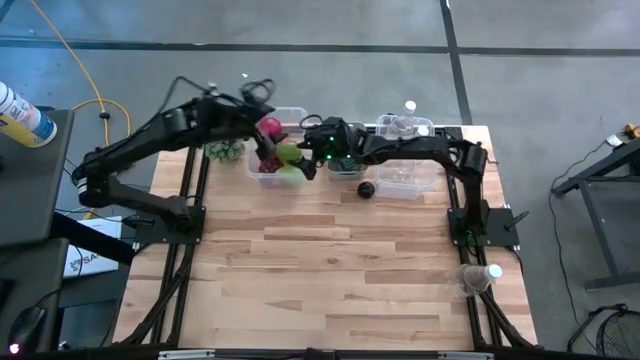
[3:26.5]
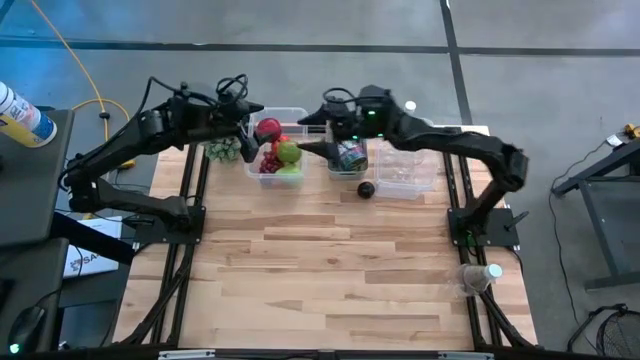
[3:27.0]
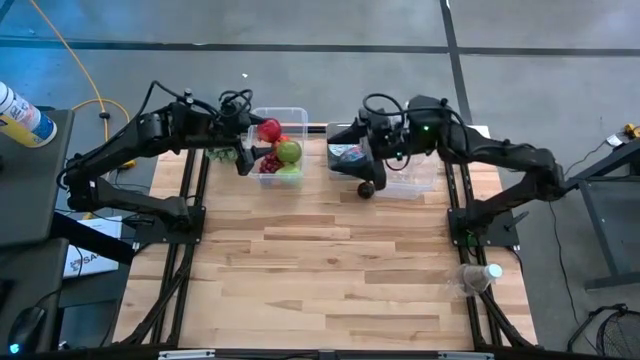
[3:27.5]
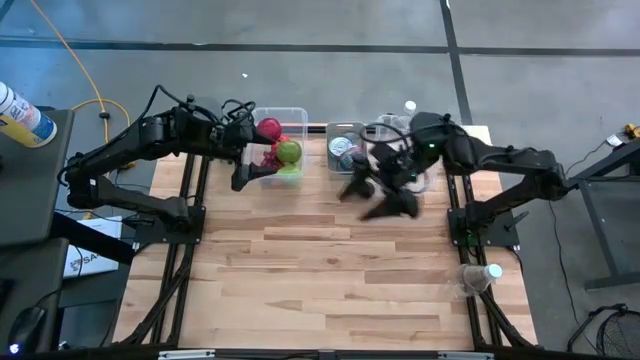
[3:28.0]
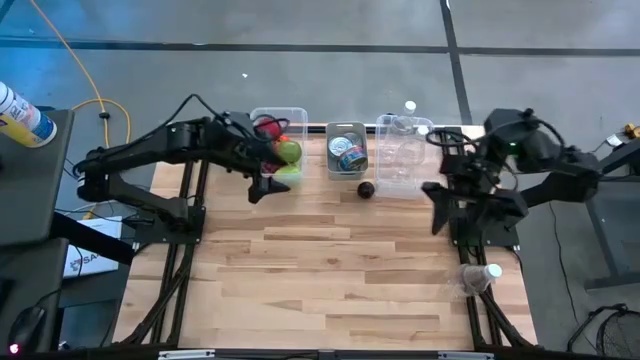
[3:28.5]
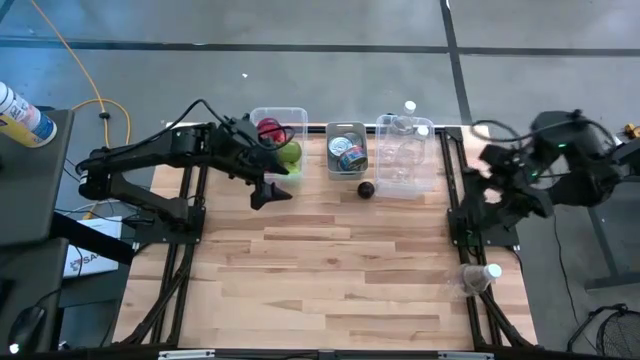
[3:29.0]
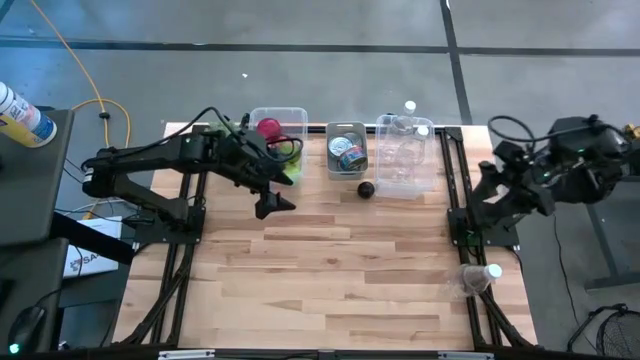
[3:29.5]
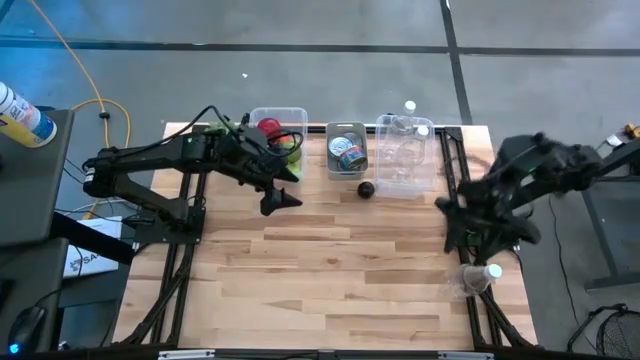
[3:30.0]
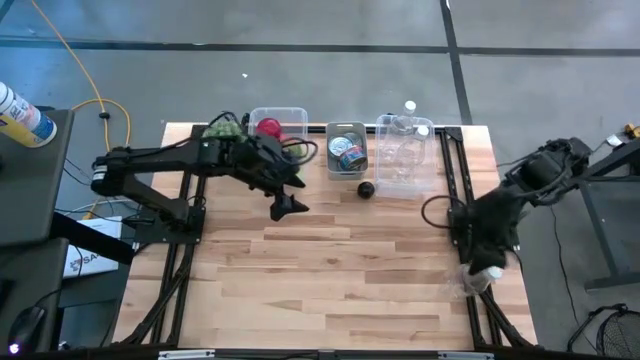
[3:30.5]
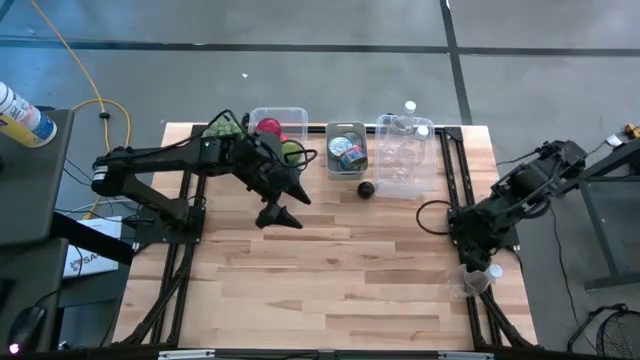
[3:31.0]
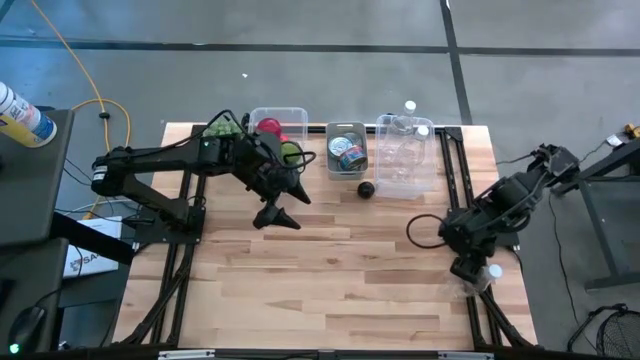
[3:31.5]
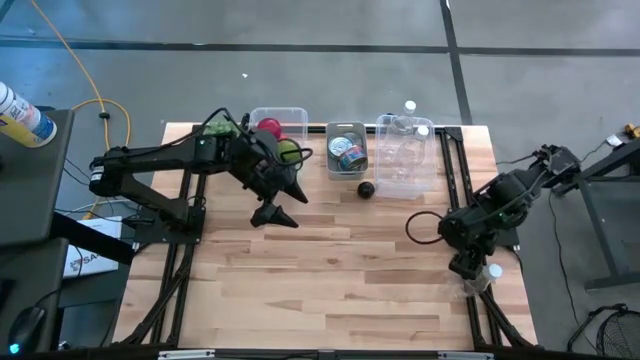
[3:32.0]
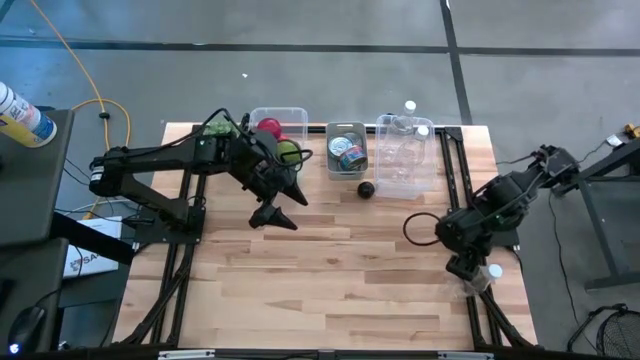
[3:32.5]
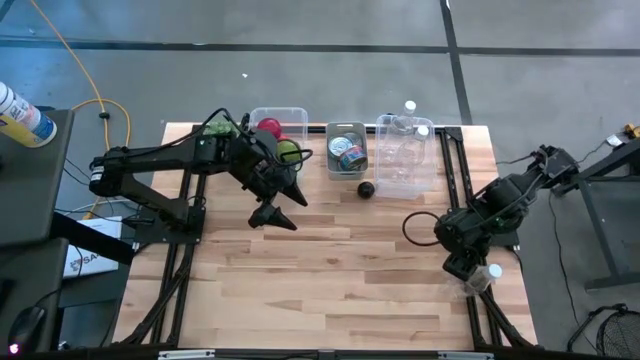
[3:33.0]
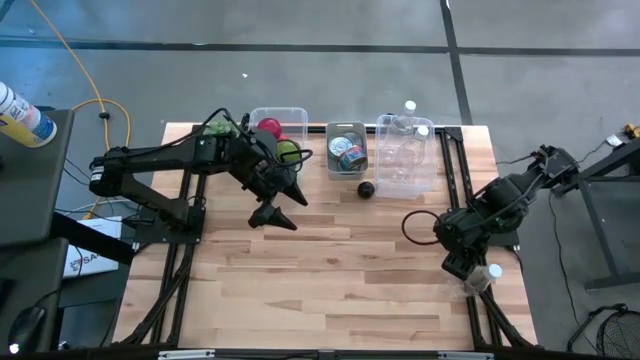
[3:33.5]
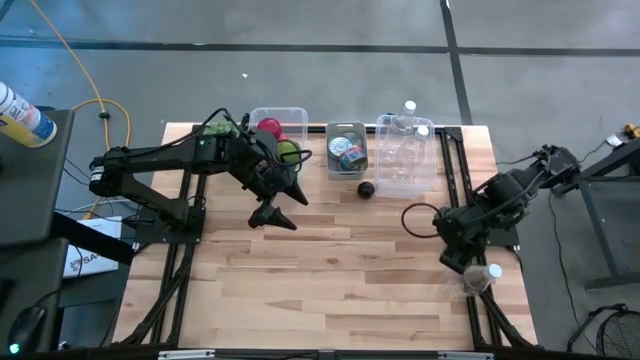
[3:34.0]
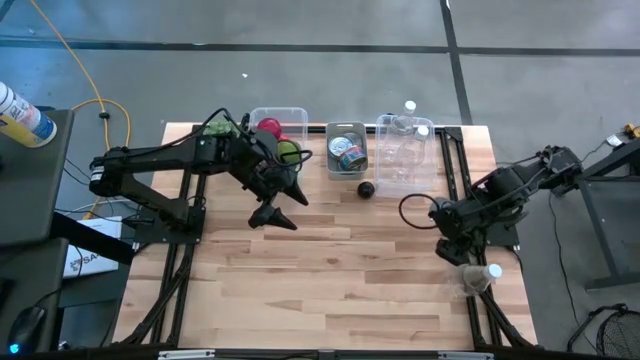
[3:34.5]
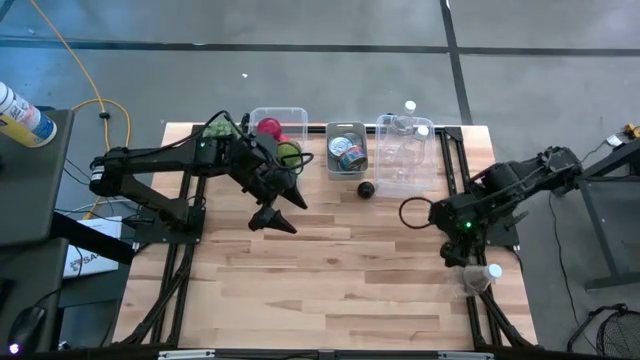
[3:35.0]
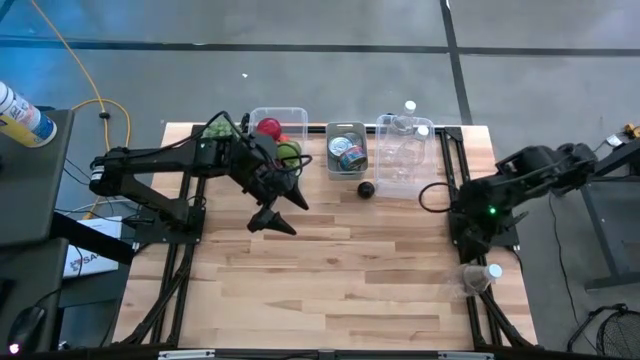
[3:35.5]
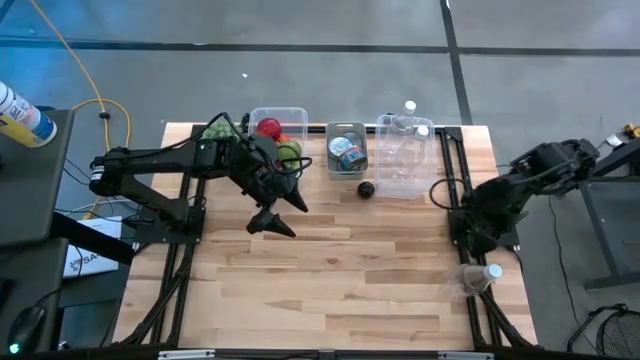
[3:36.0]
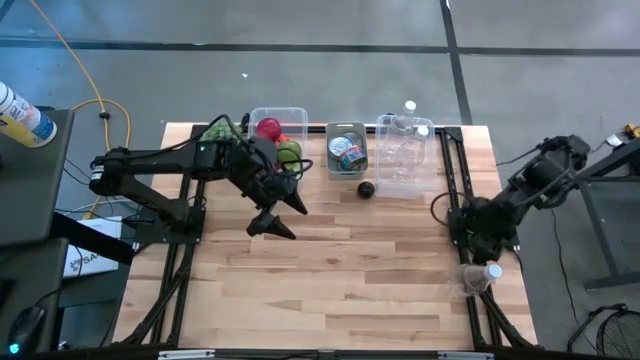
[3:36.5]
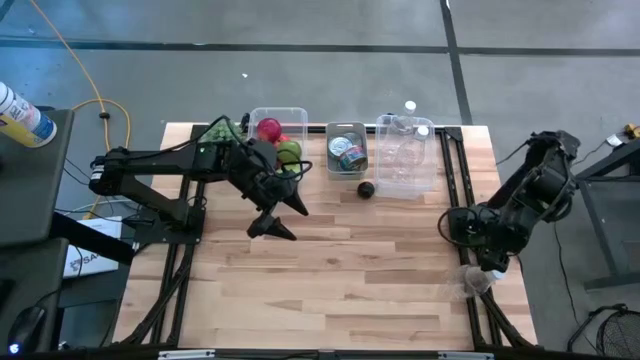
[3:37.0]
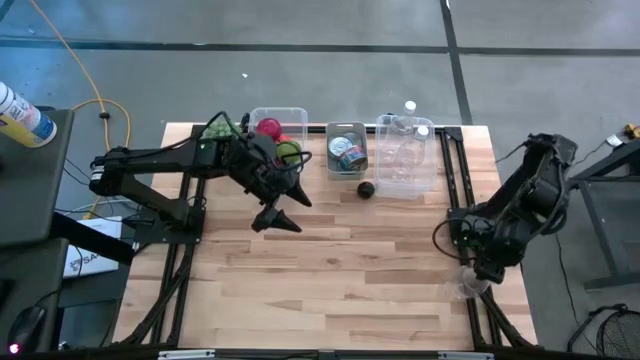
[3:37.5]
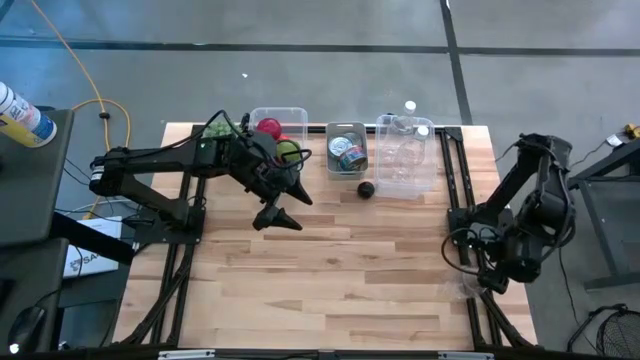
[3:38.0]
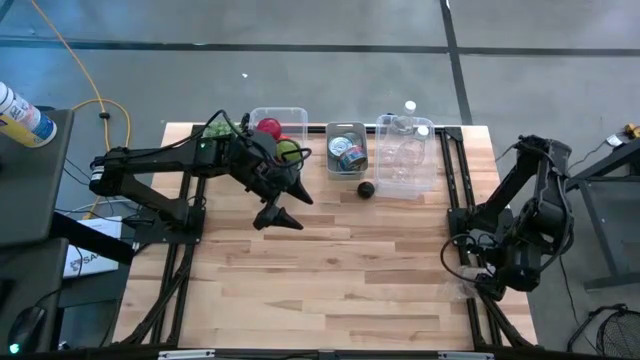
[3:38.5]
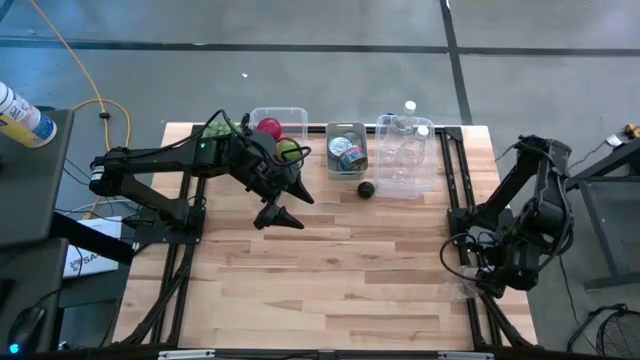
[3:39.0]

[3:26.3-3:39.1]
Task: Pick & Place Food Item
Put the empty water bottle into the right transparent bin

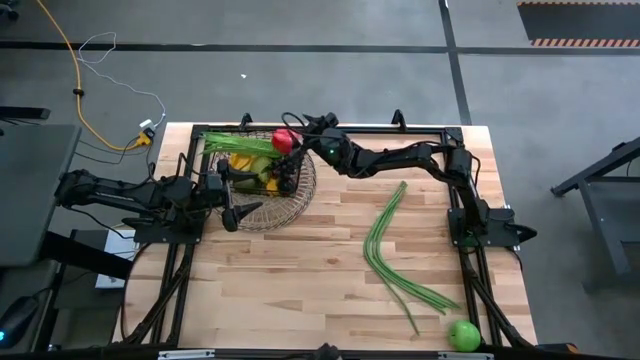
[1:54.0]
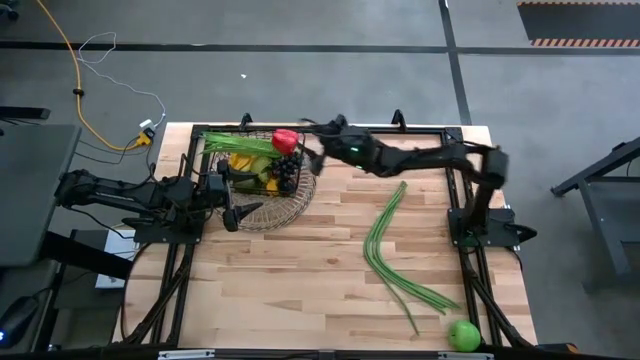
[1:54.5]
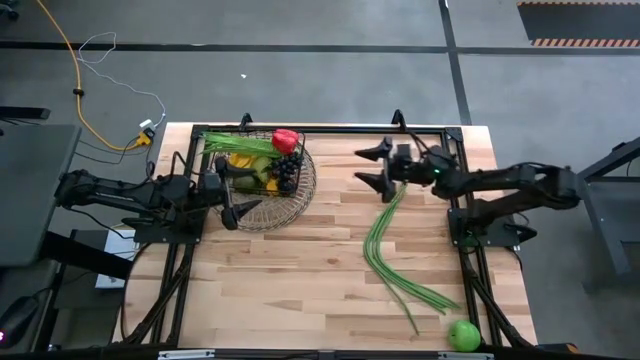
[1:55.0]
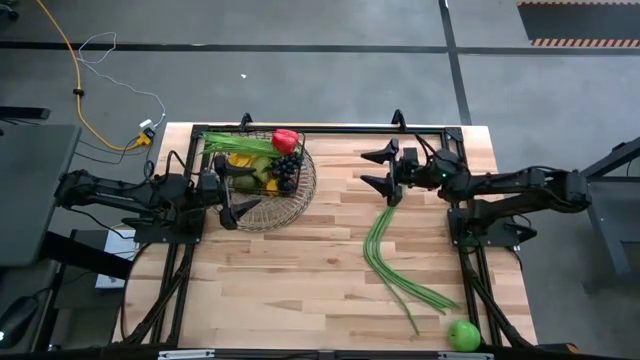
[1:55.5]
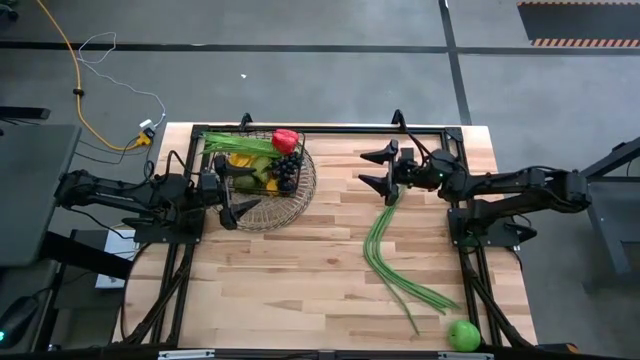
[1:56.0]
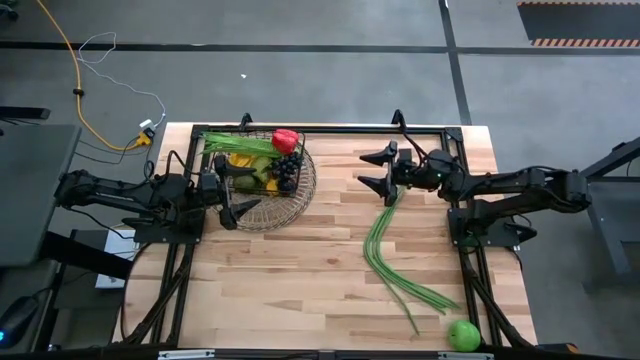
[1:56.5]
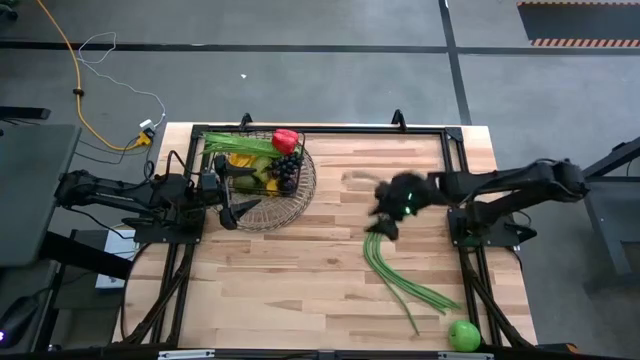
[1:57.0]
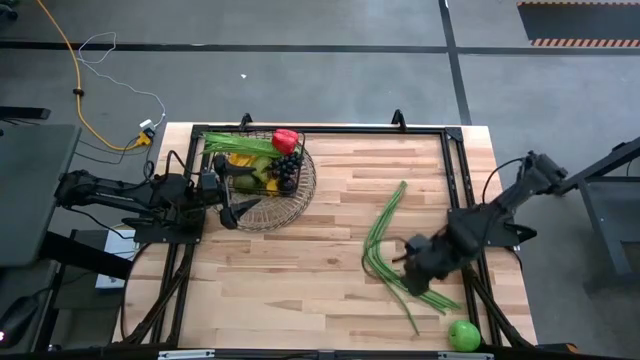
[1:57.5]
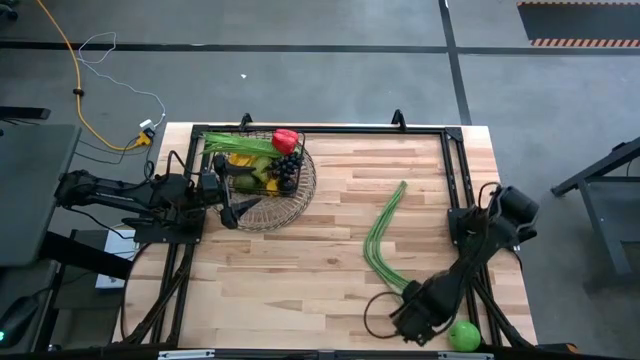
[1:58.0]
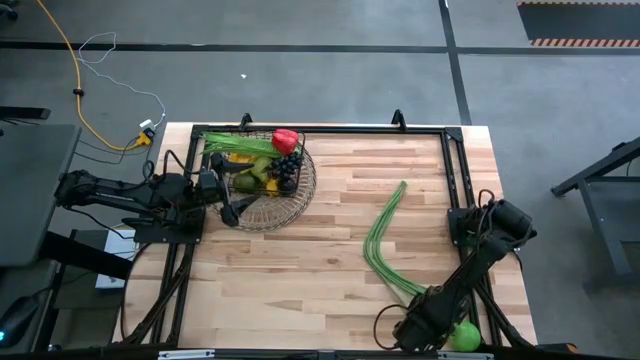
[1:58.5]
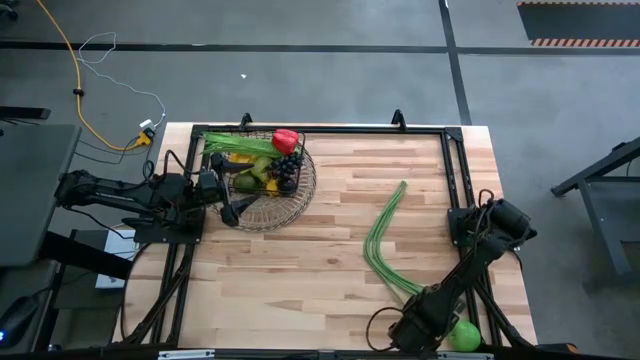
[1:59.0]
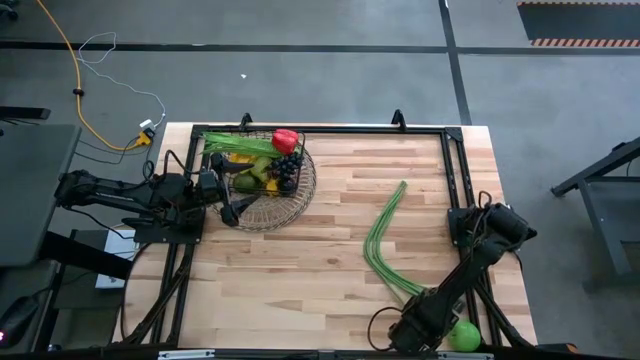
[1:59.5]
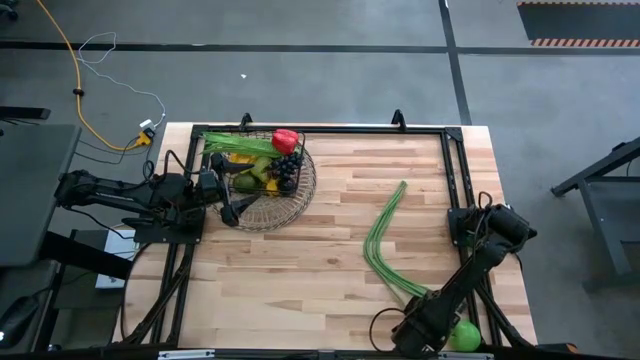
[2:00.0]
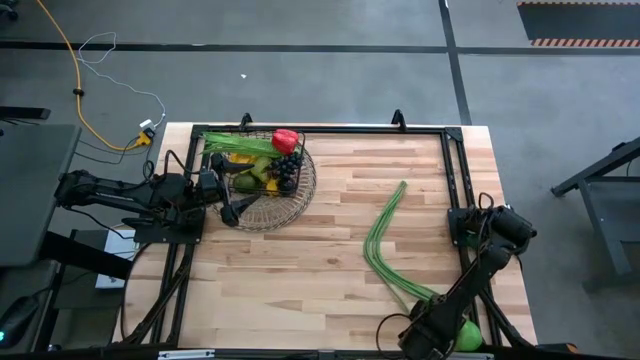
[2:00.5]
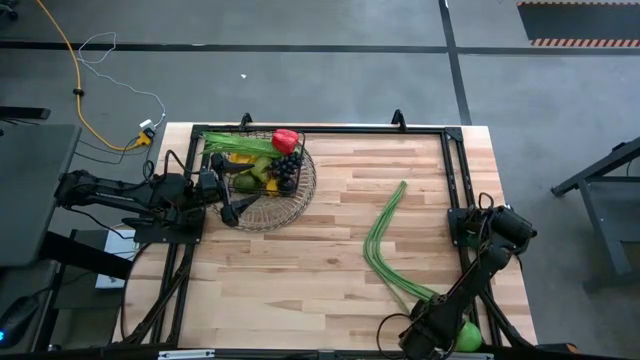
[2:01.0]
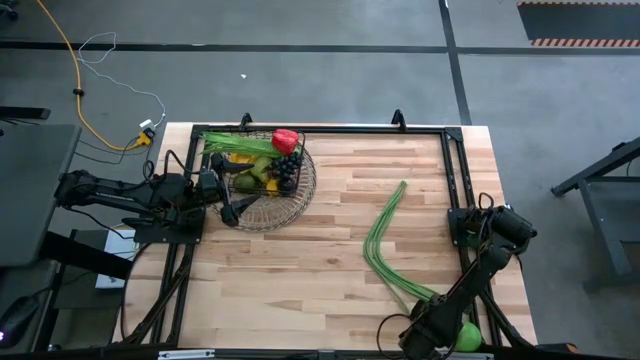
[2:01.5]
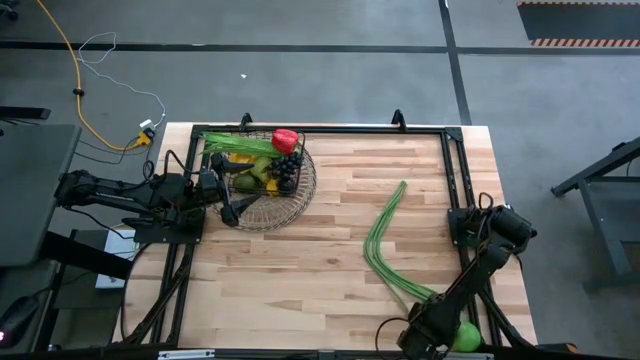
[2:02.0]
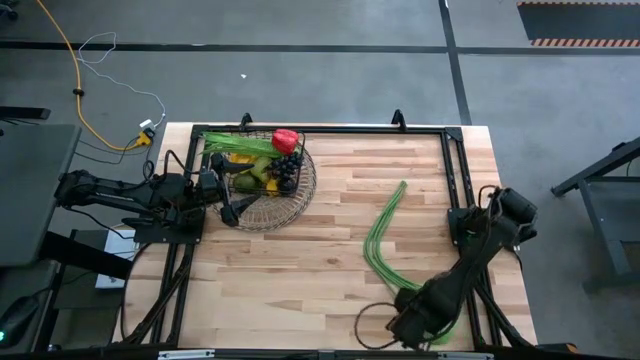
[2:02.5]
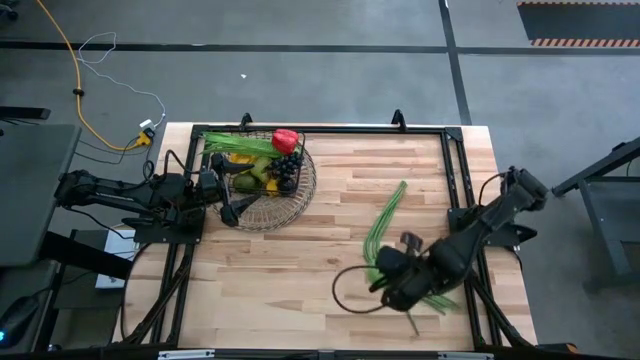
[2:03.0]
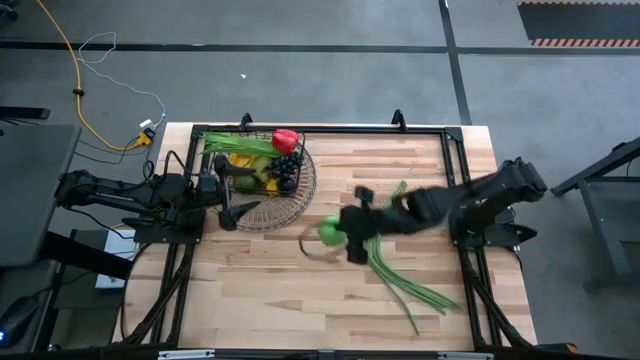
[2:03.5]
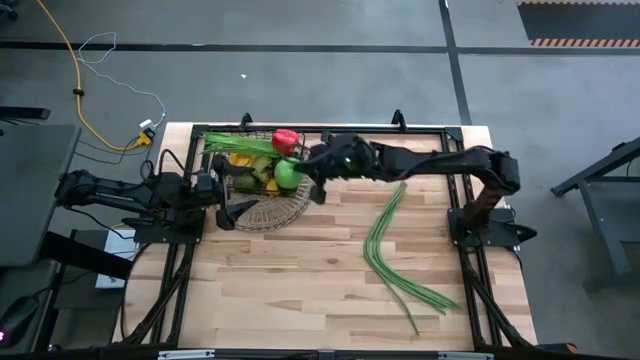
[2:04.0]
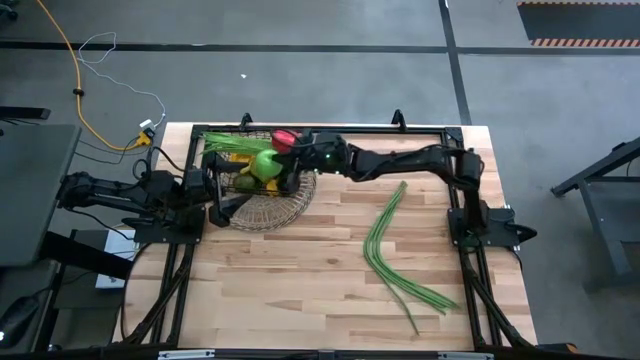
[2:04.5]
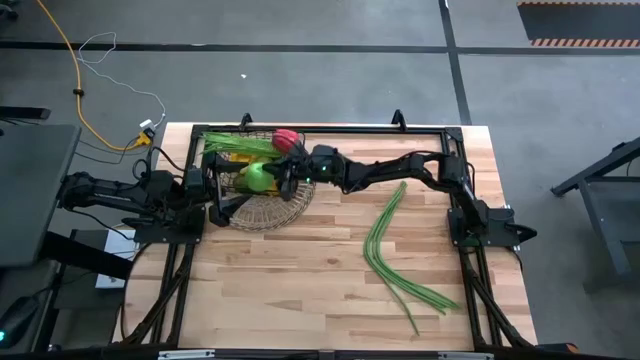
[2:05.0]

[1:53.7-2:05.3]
Task: Build produce basket
Put the green apple into the wire basket
